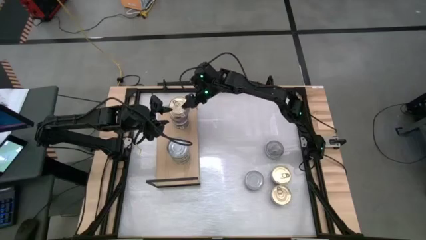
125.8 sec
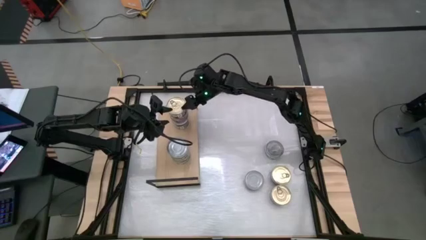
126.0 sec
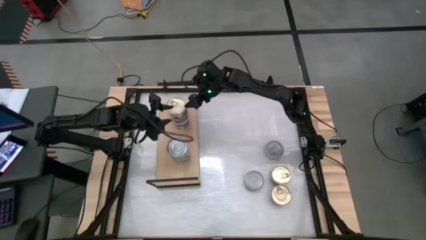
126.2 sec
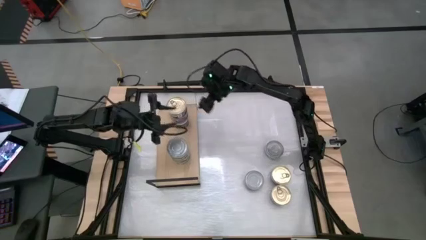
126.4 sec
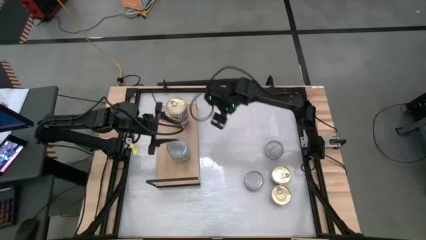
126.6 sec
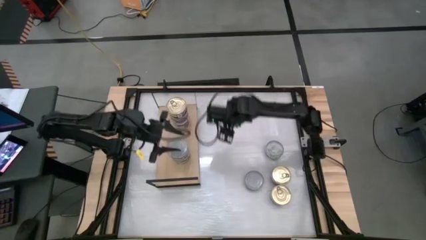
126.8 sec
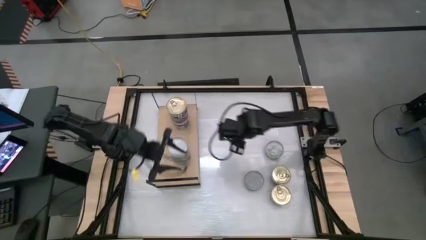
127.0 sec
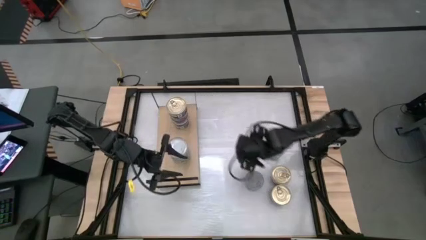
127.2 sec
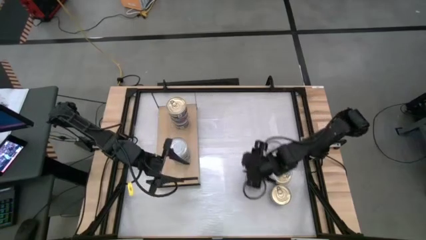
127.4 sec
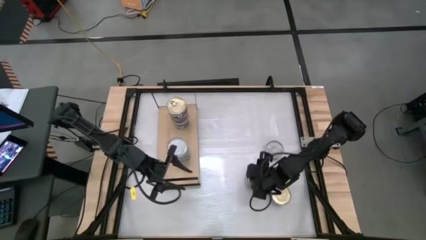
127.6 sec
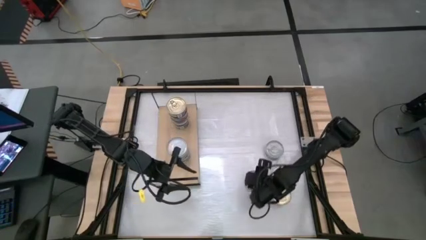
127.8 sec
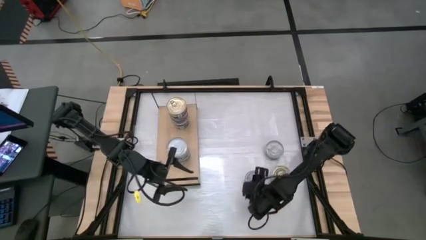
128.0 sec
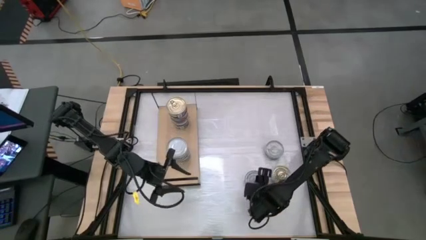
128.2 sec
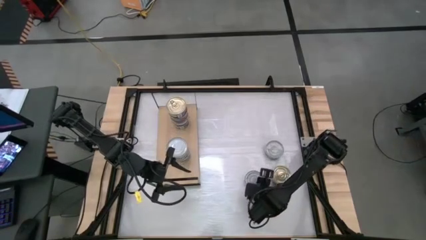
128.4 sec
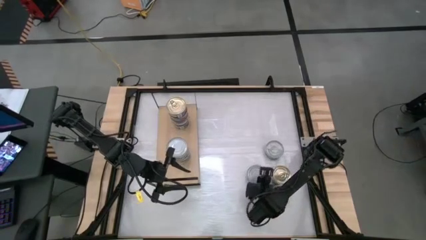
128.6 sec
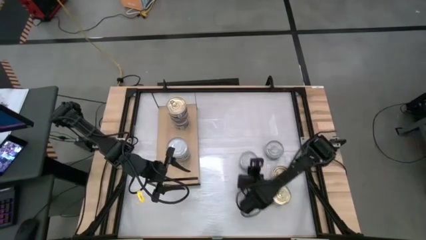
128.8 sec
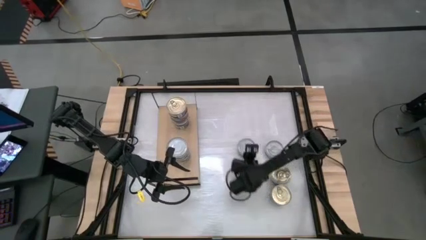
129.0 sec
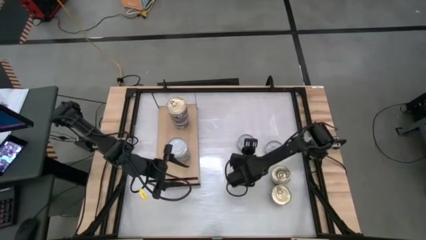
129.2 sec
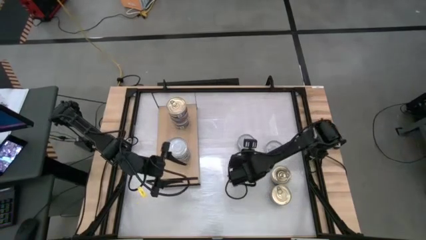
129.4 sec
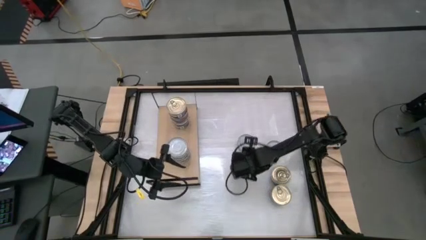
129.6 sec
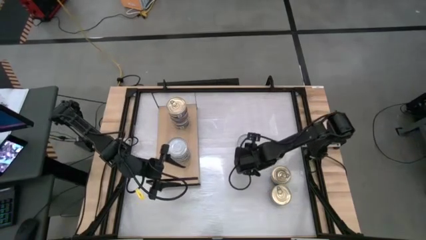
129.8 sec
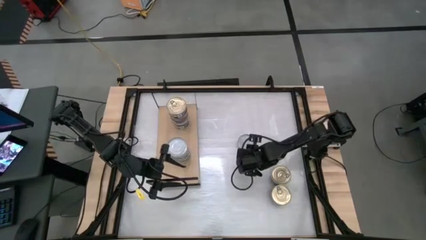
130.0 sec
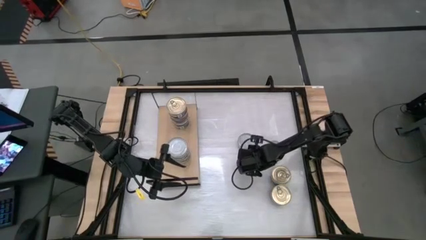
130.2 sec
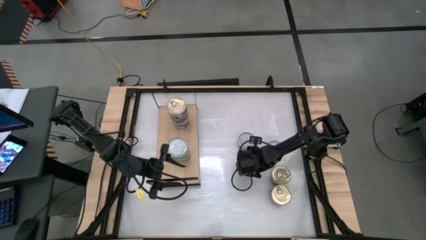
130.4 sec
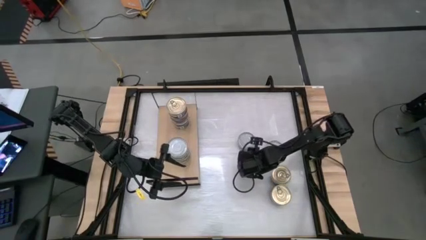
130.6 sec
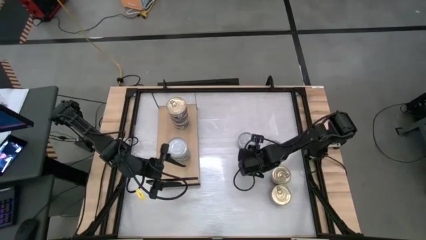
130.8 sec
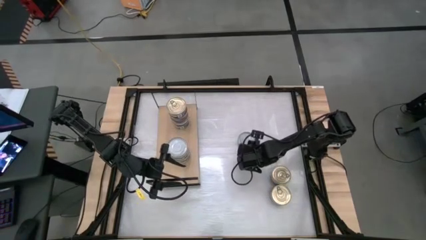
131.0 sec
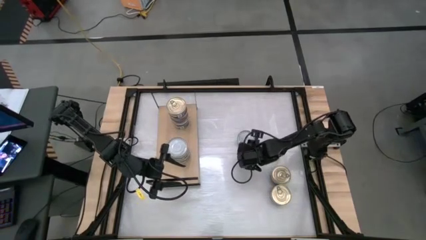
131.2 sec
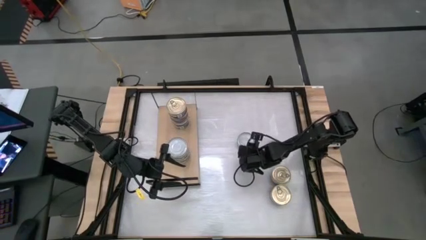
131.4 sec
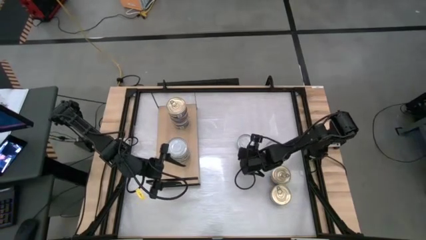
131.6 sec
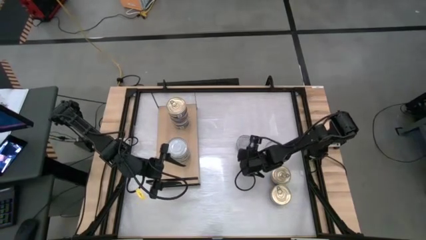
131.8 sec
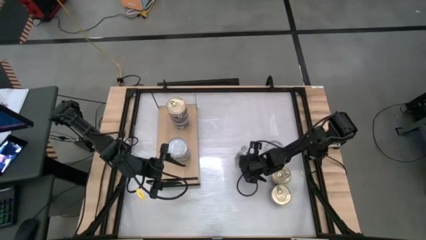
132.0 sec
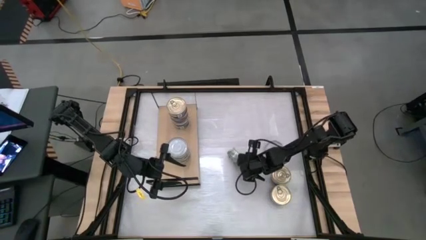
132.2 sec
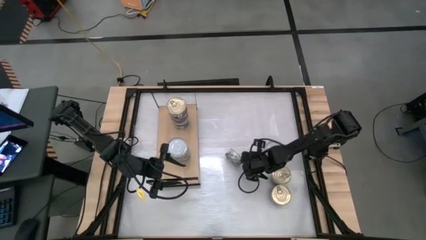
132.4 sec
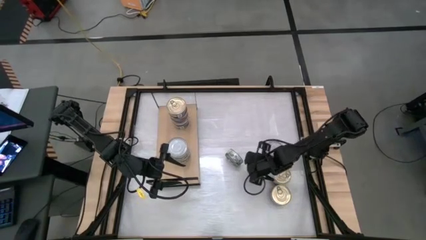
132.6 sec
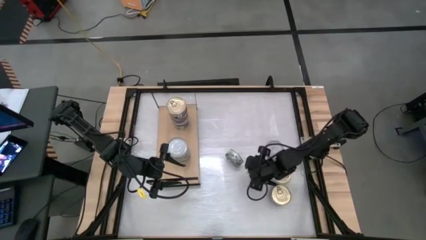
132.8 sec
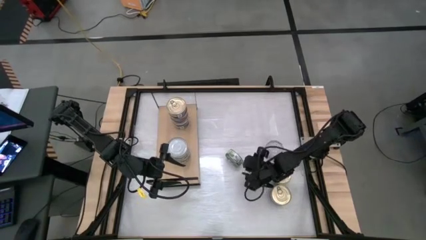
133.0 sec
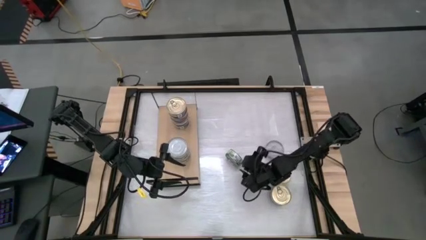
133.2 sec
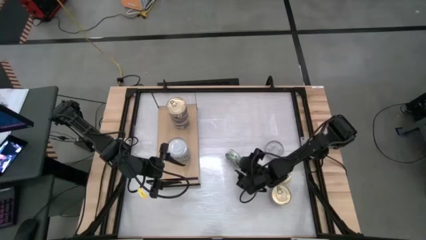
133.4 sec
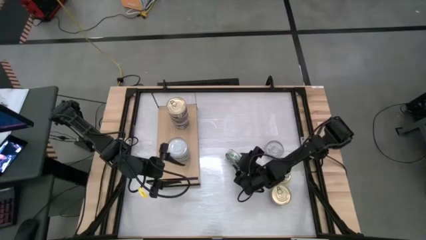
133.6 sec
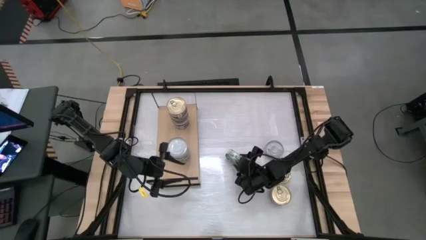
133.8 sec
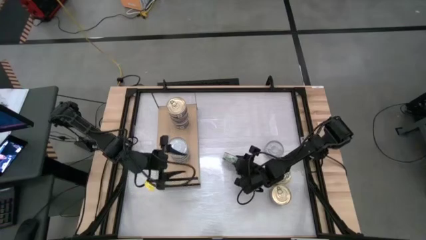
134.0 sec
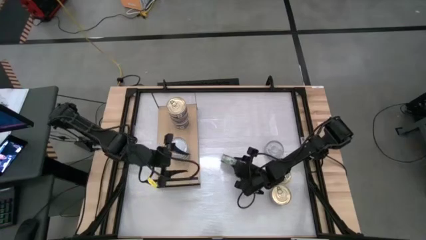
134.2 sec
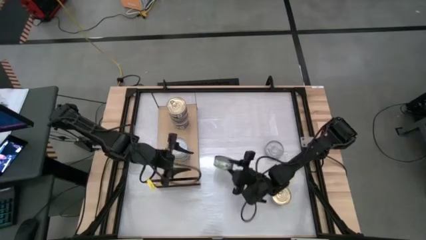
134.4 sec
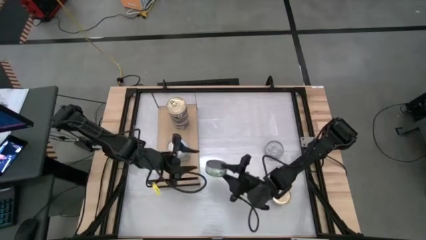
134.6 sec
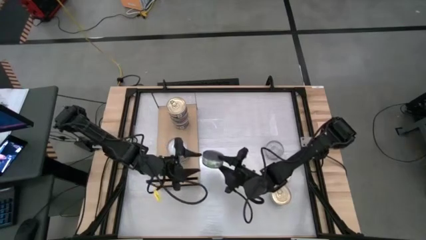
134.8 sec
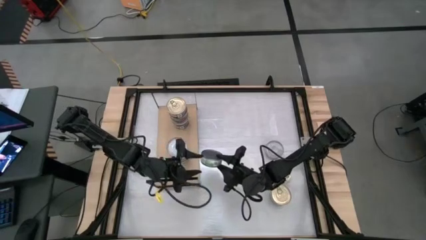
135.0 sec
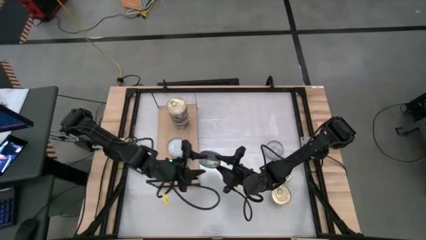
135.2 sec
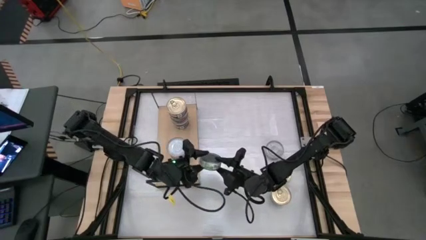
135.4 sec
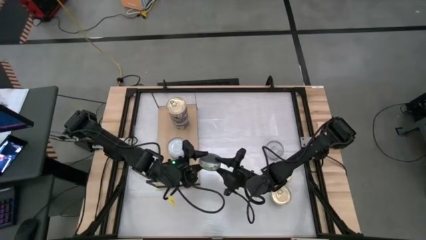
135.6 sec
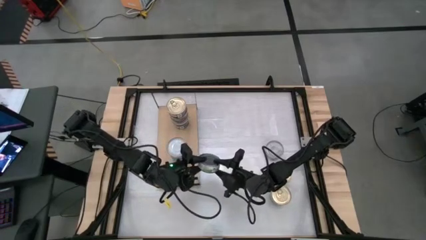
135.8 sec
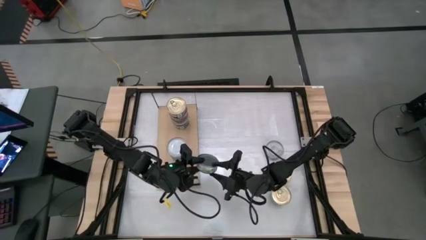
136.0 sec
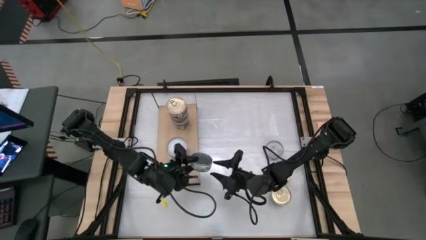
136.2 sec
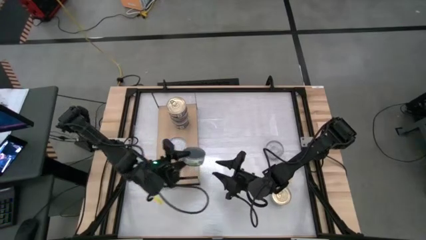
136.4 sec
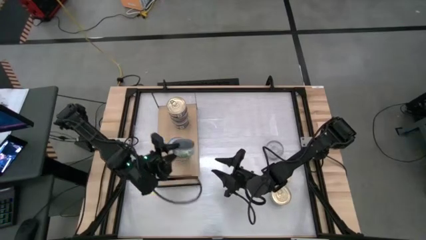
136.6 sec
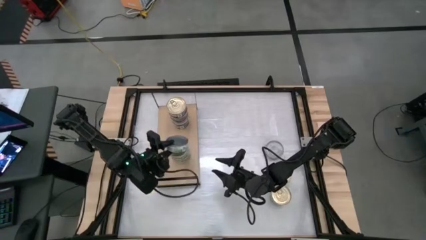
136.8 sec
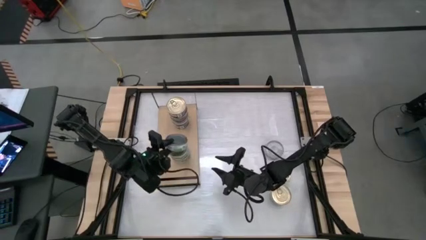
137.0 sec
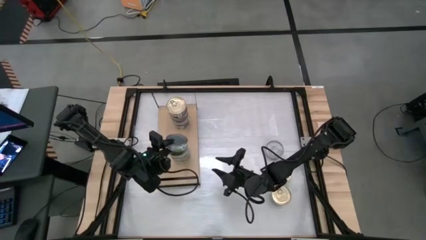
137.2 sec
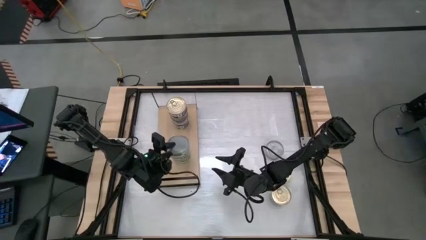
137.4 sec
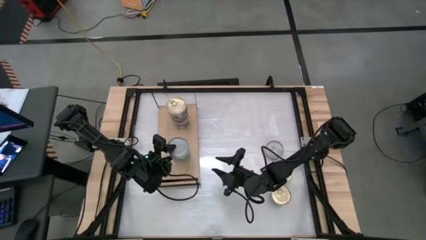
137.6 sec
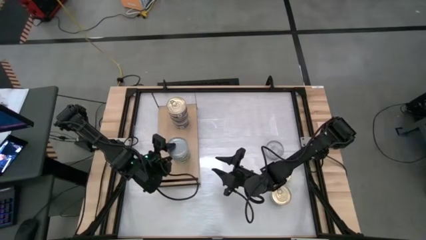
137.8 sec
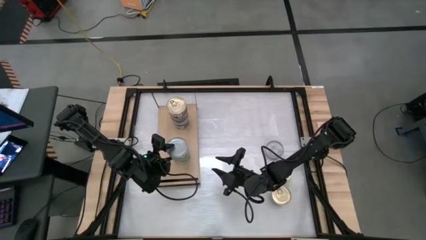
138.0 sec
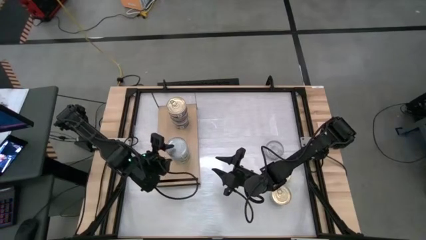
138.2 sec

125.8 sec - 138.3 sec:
Task: Stack canned seafood by type on shelf
Stack the green tuna can on top of the other green tuna can on the shelf

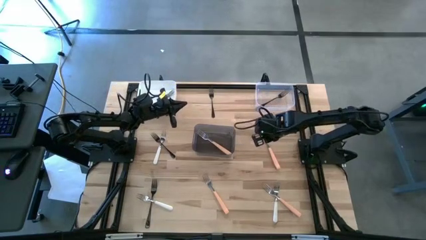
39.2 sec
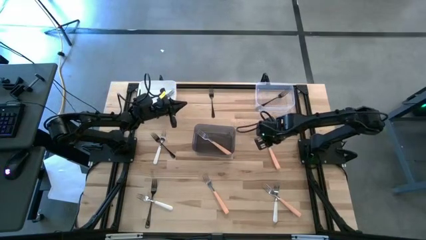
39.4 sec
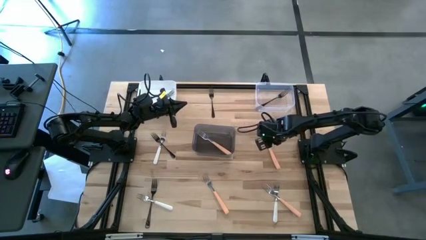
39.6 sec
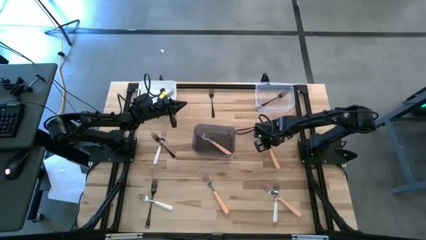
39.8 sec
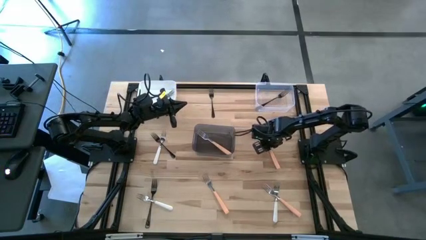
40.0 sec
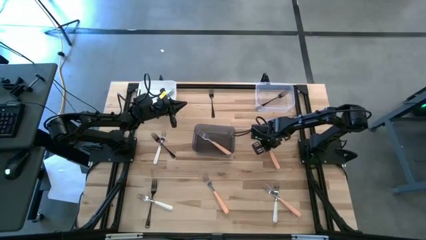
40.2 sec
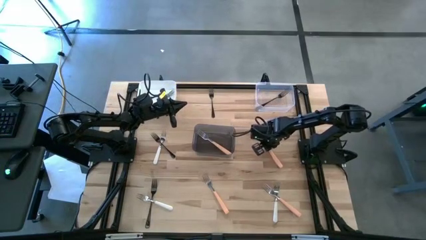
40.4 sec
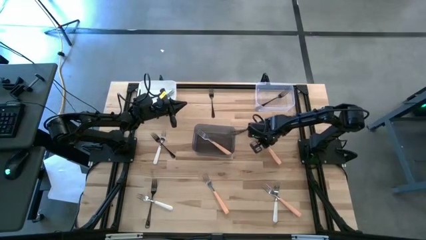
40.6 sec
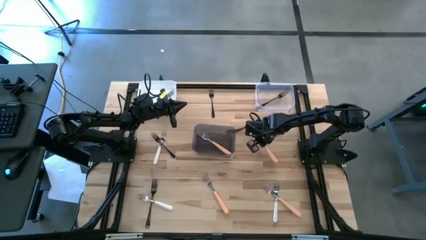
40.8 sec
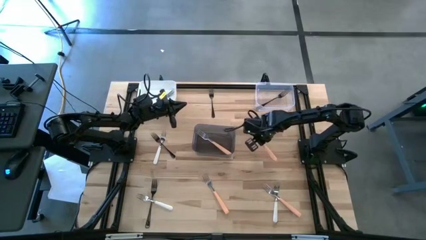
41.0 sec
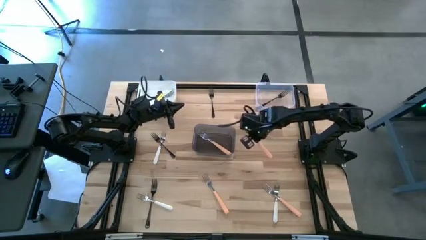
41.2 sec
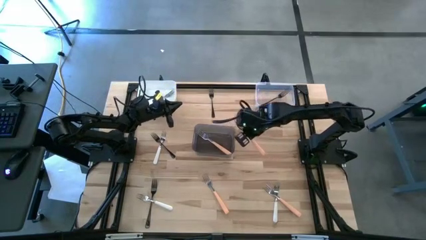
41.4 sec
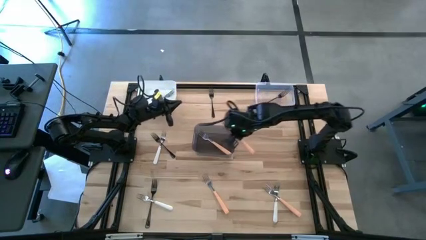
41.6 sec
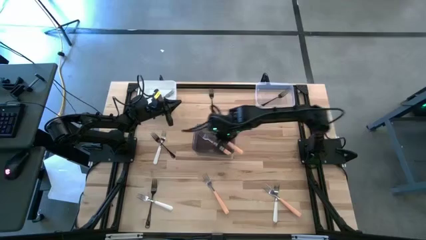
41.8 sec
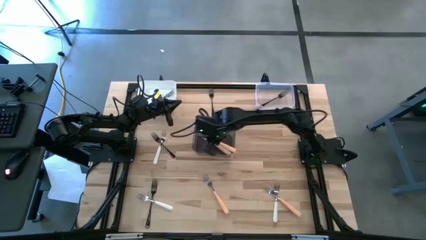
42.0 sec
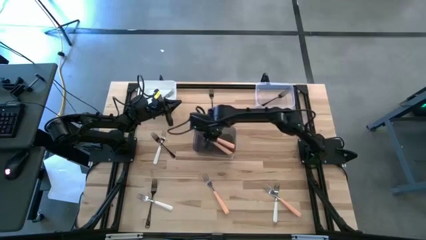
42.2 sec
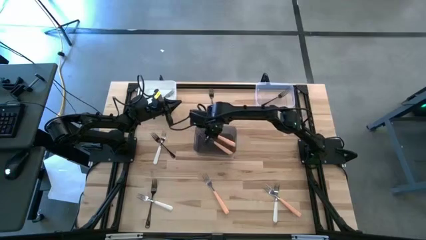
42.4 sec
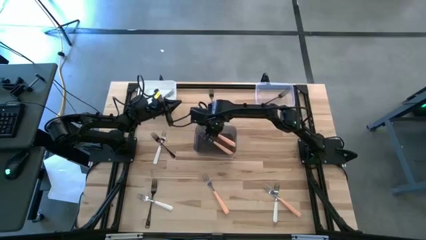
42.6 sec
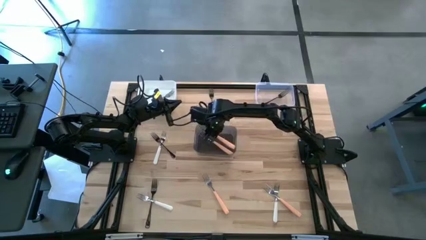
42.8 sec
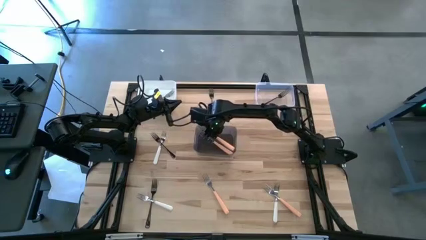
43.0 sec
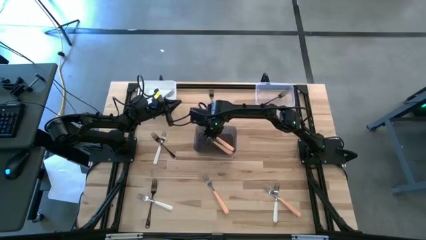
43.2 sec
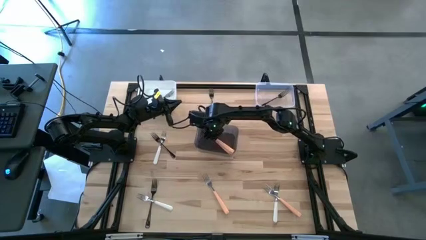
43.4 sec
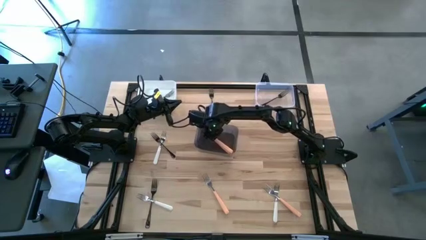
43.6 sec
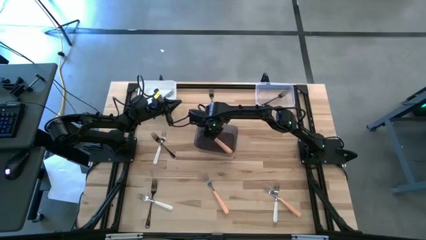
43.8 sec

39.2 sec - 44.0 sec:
Task: Sort silverware by color (type)
Put the top orange fork into the black bin

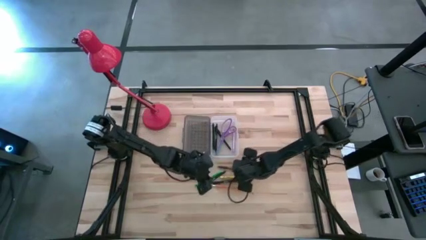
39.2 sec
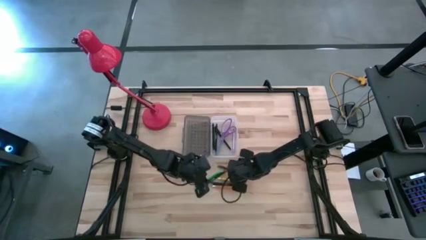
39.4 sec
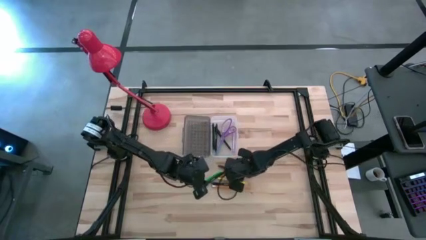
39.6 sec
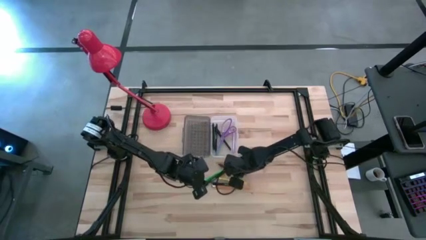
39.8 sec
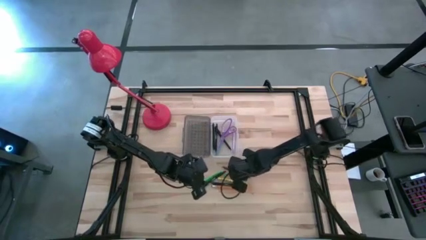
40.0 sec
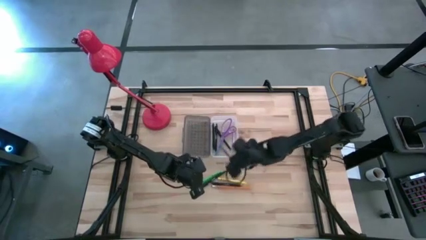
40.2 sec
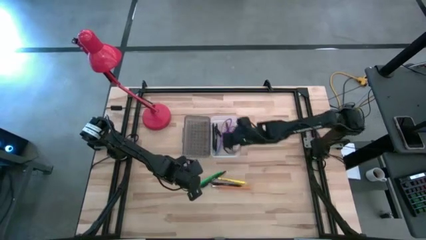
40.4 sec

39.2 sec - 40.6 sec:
Task: Pick & place school supplies into a supply box
Put the brown pen into the supply box
